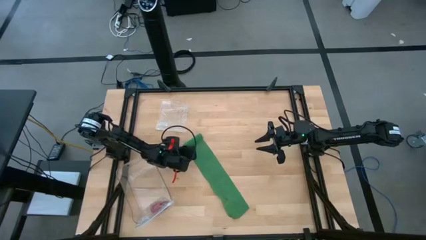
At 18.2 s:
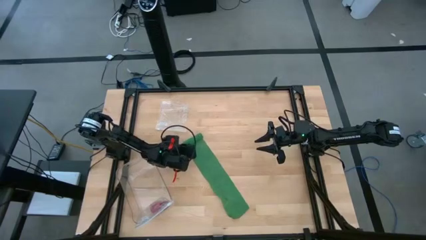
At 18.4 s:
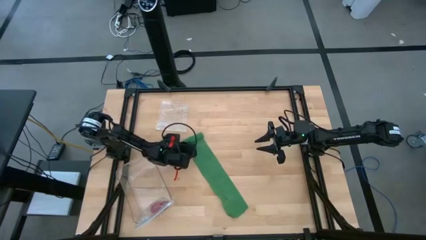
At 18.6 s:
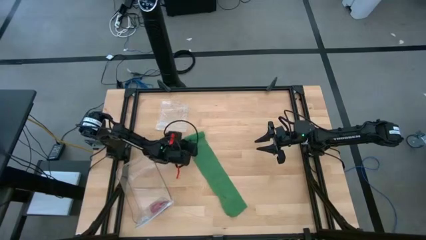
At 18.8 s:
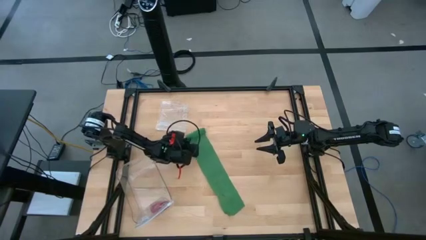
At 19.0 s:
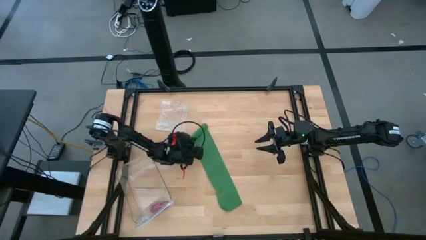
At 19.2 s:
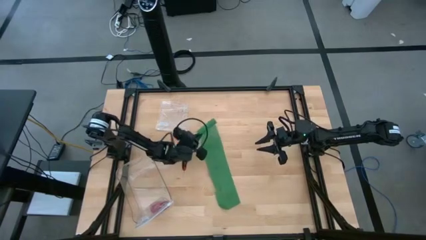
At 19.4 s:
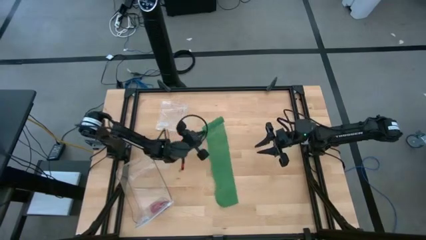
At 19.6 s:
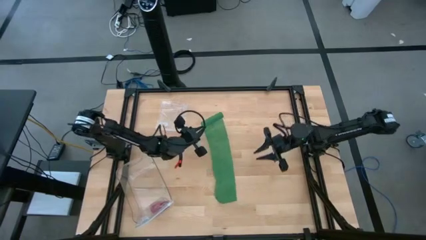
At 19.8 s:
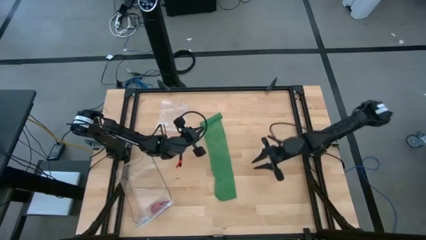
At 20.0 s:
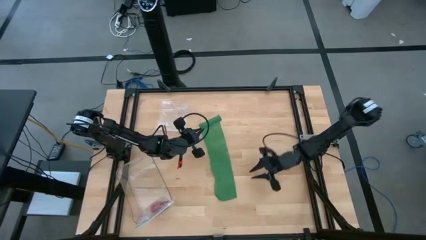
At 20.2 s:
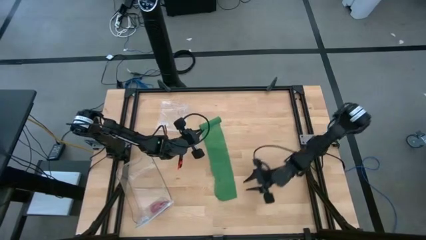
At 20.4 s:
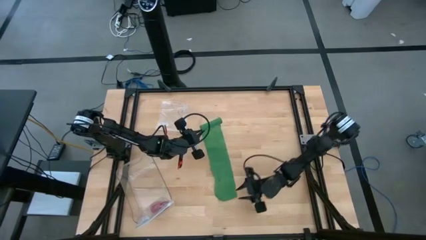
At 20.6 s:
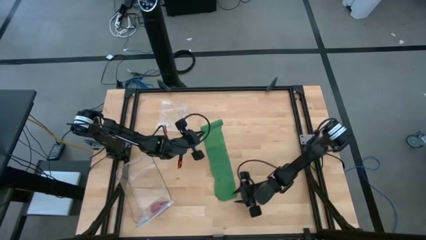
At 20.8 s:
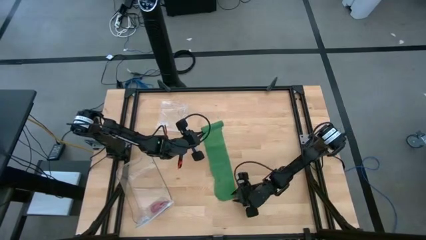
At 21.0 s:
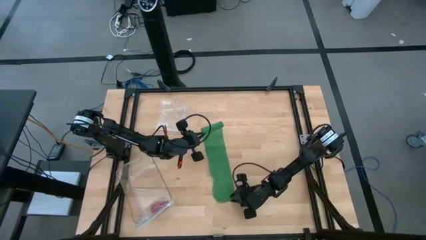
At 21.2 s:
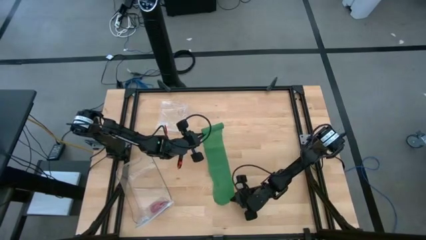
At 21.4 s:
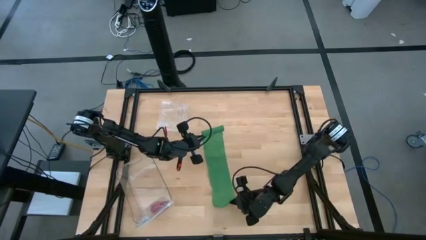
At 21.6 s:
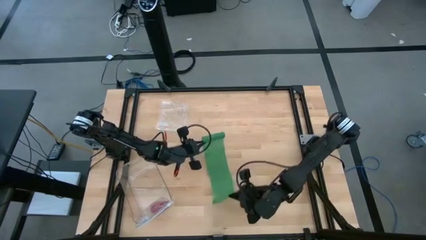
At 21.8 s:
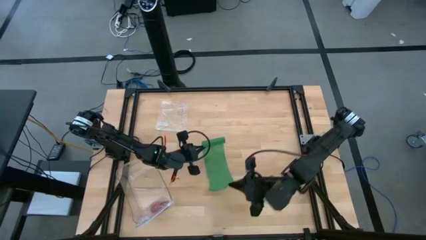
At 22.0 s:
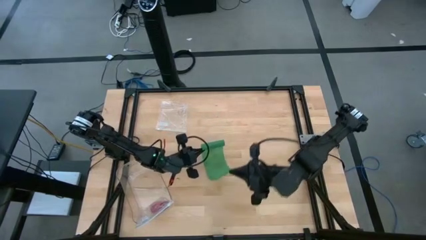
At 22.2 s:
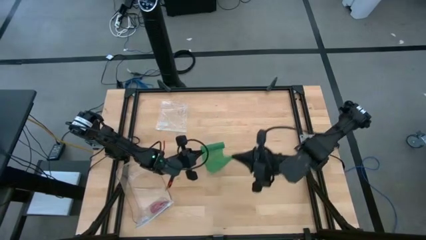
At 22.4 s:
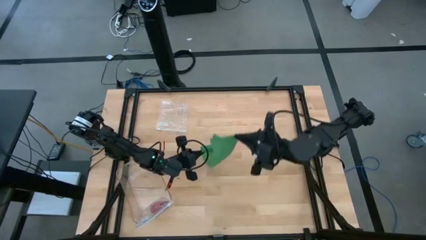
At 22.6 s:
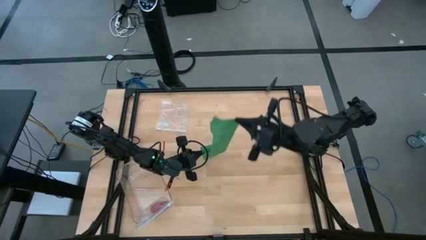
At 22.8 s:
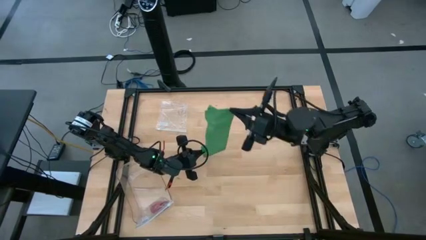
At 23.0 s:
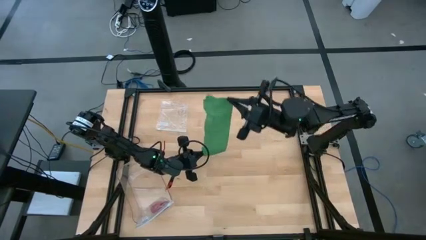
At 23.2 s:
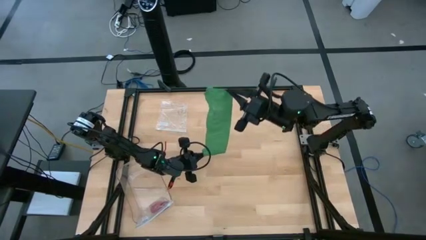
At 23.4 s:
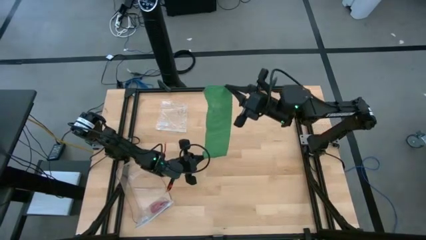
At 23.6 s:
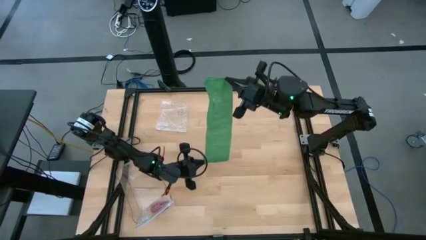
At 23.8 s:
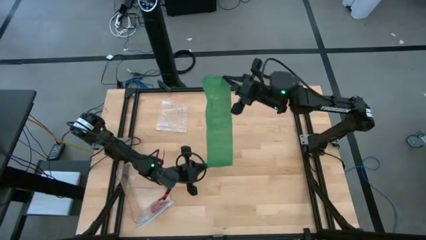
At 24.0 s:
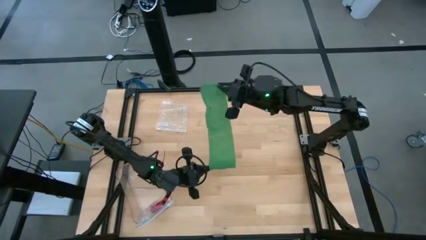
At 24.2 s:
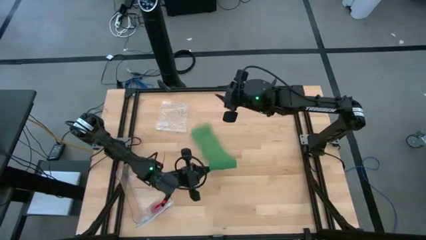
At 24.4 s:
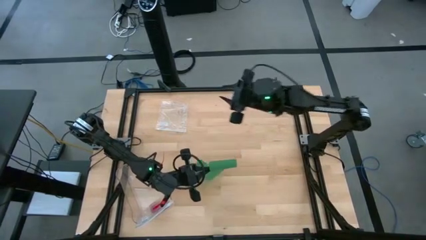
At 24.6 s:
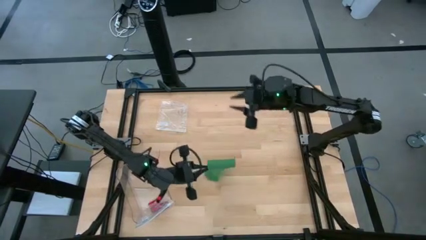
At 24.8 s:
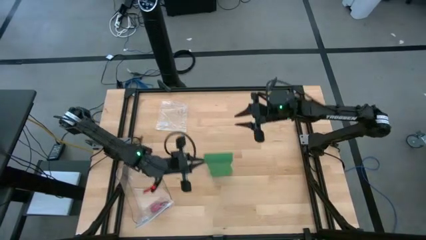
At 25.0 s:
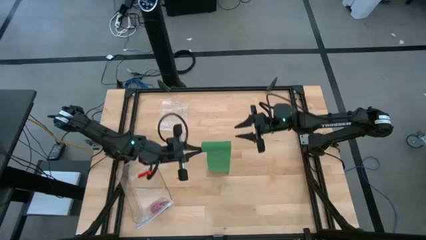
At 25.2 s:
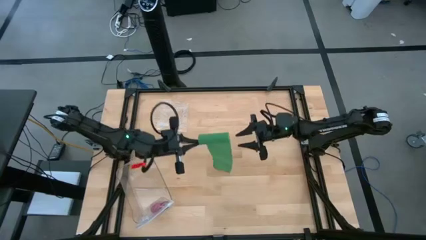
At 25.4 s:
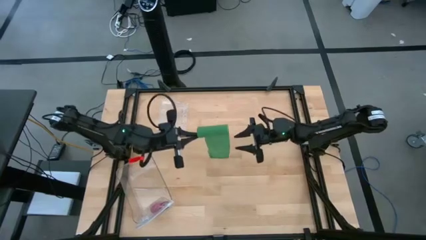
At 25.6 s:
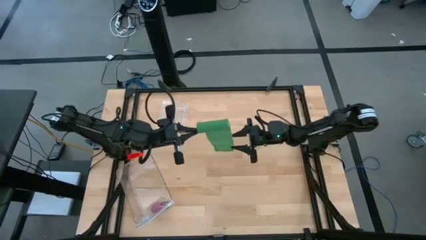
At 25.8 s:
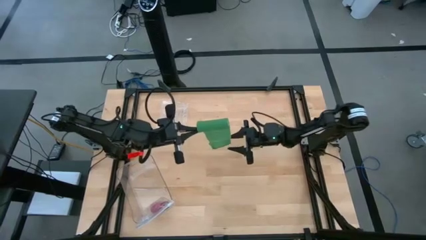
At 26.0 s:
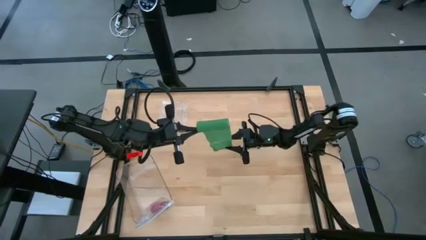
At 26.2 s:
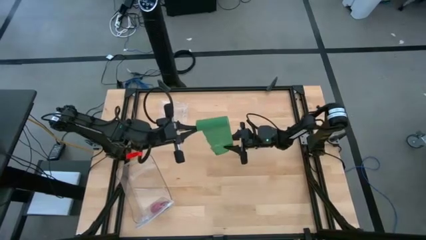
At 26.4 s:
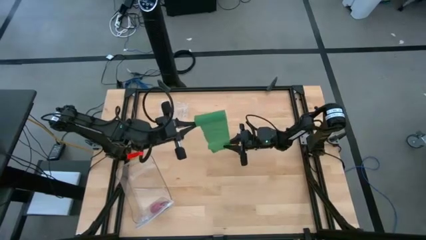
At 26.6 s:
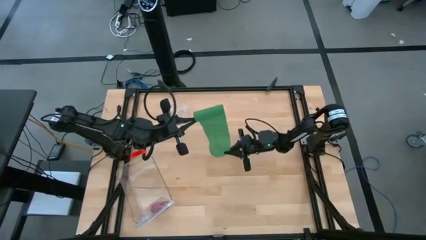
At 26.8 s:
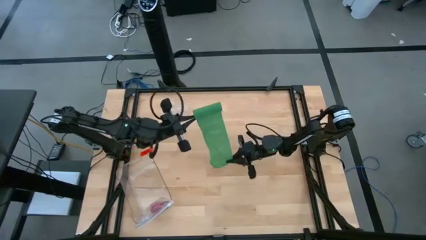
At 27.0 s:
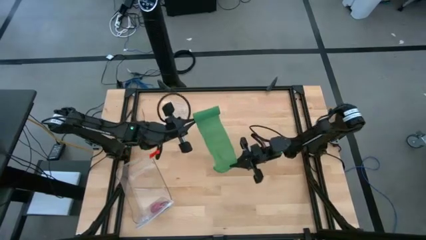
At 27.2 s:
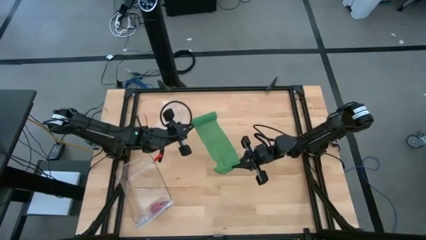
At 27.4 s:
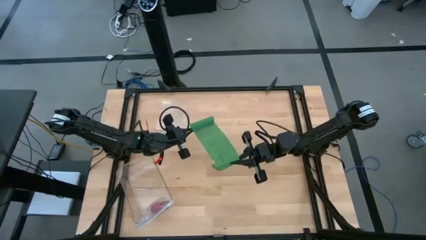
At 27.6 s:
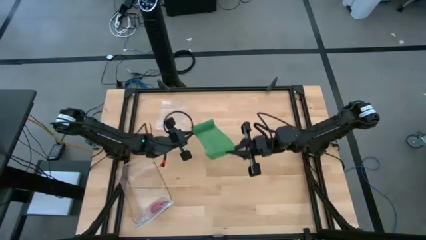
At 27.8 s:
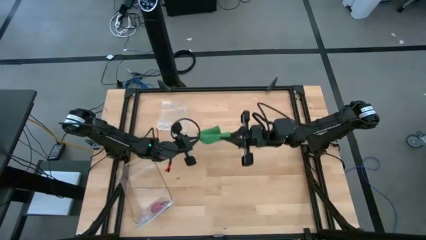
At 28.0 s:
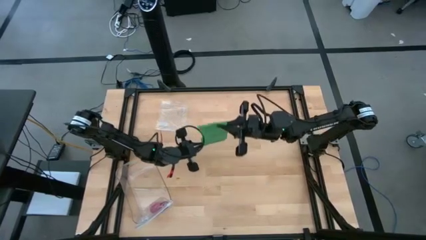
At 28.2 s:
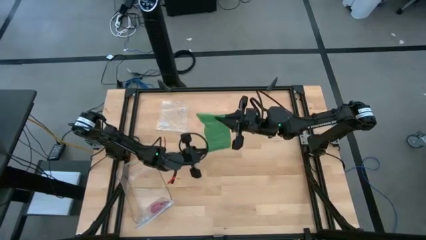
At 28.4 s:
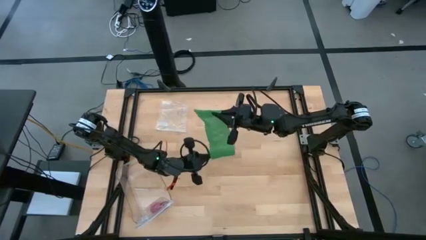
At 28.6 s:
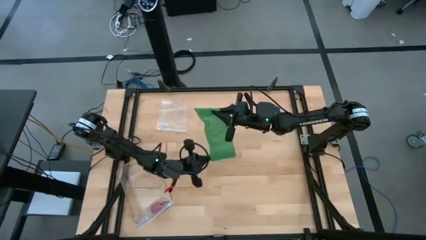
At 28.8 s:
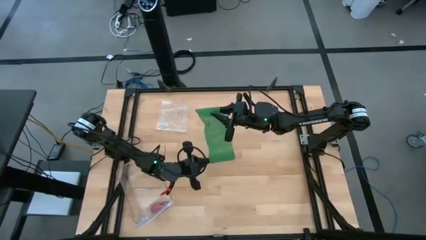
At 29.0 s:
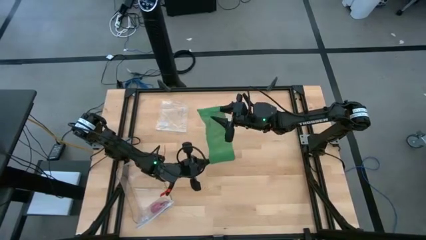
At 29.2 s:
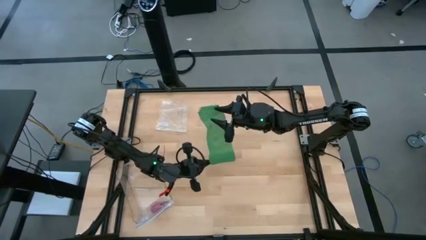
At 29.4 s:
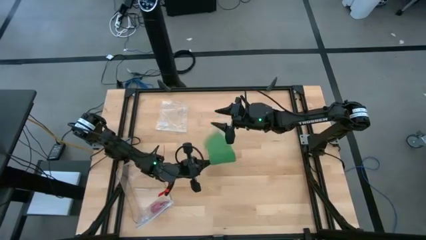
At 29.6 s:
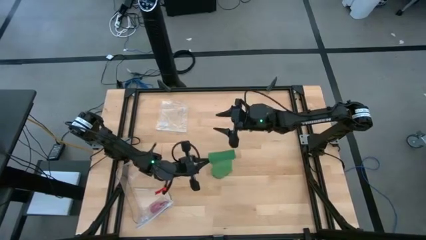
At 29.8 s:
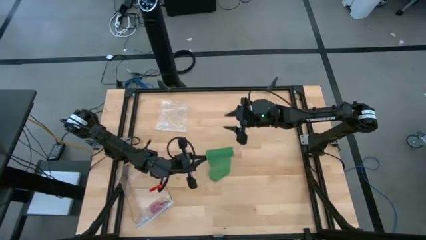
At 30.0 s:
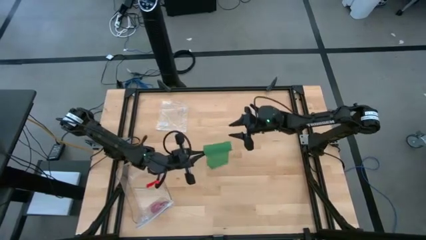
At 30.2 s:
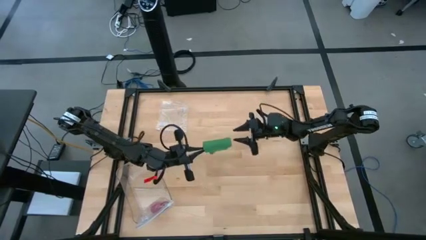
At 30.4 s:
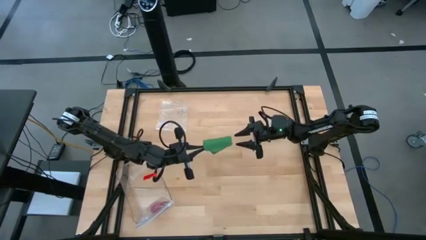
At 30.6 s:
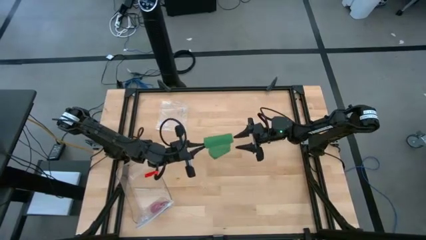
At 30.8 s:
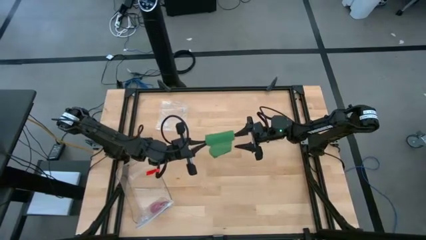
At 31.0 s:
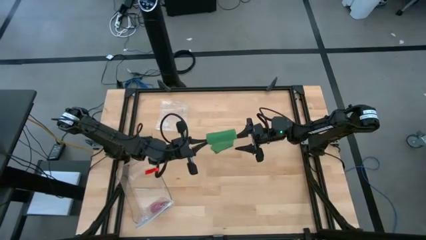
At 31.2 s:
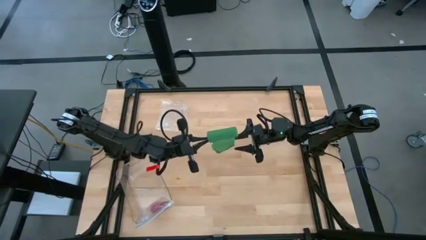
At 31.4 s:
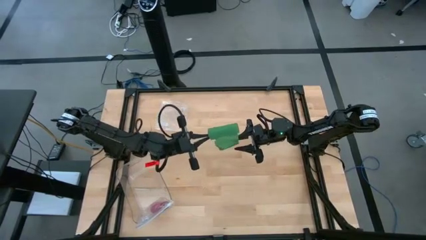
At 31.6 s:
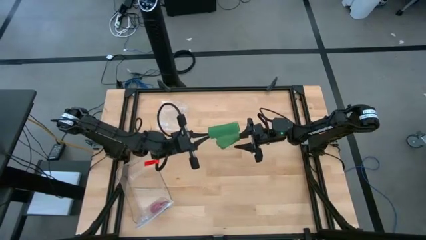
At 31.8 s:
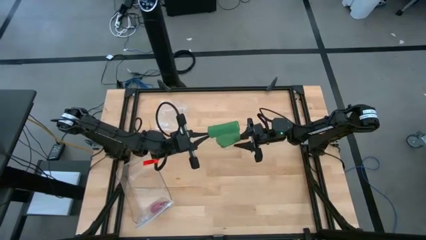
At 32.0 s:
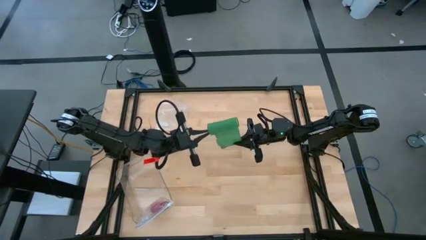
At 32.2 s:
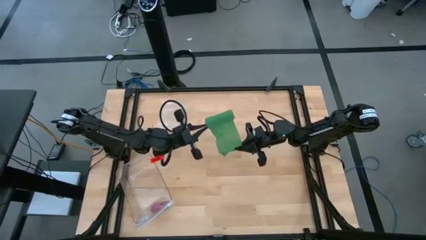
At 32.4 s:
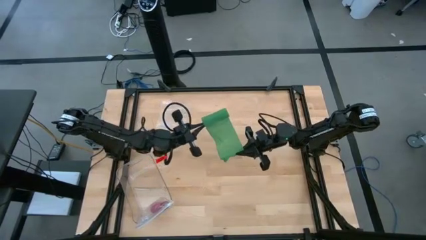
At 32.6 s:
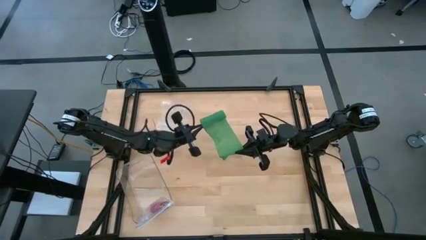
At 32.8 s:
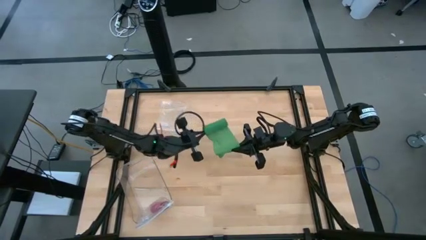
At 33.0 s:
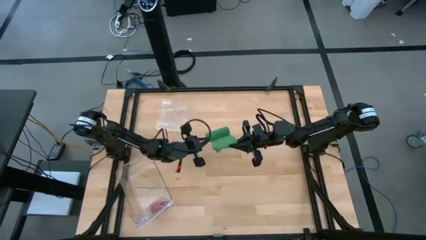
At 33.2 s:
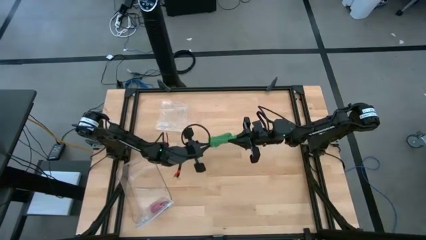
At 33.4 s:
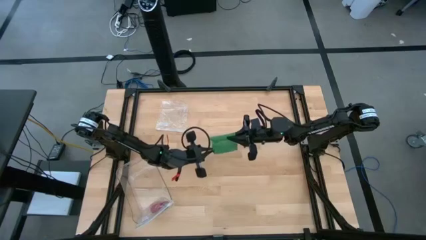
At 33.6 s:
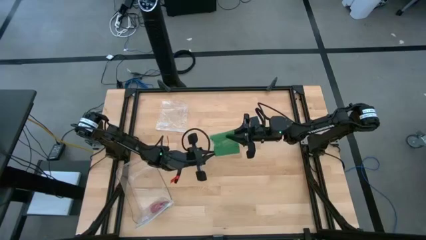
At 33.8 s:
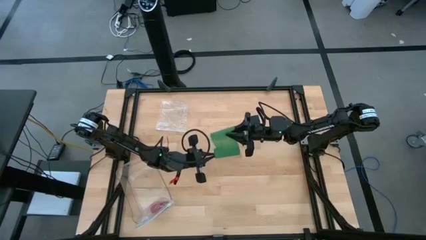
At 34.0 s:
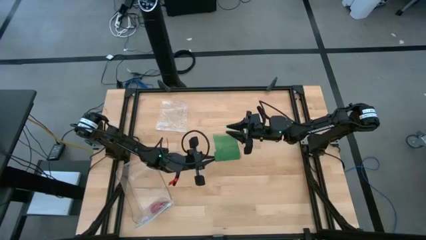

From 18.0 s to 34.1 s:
Task: Roll bandage
Roll the green bandage
